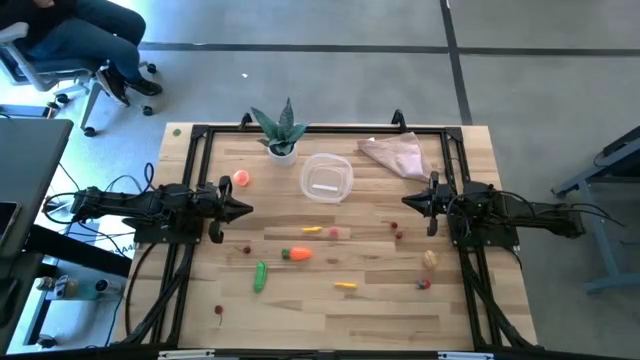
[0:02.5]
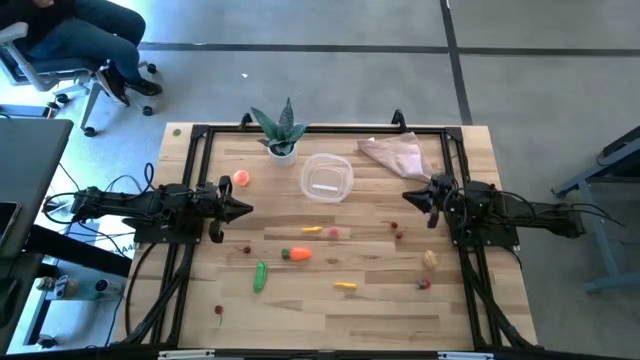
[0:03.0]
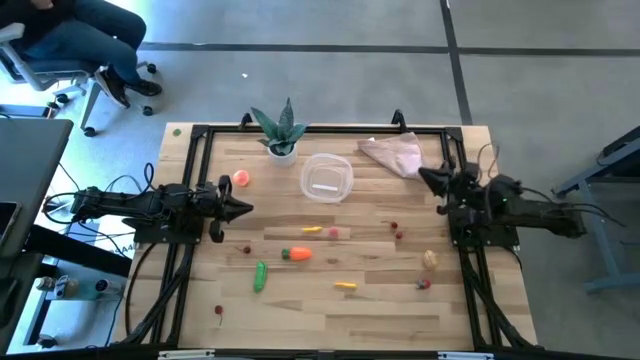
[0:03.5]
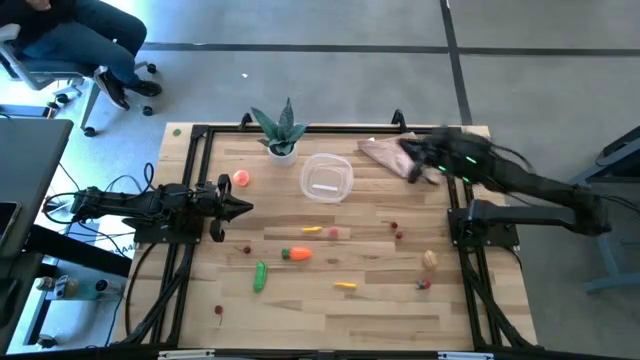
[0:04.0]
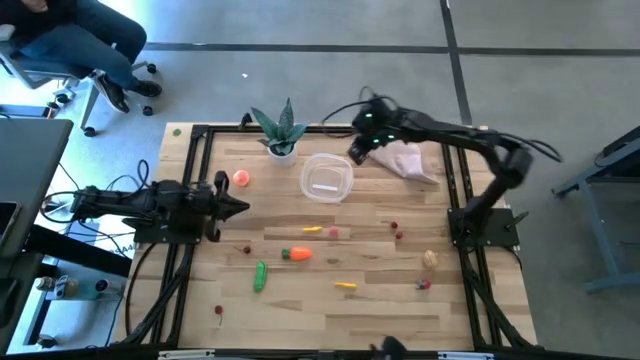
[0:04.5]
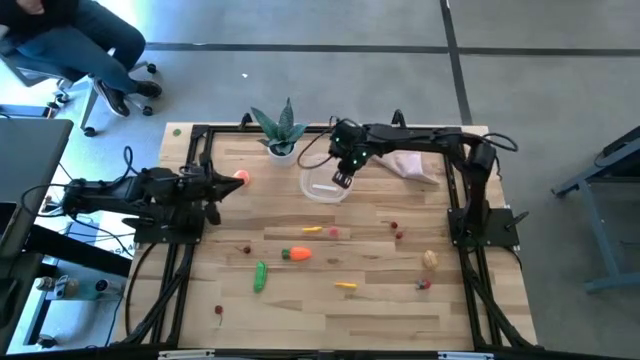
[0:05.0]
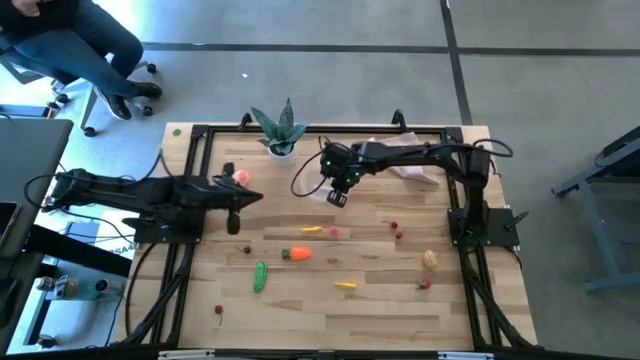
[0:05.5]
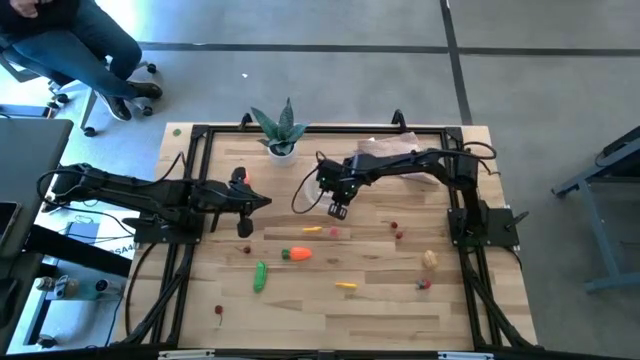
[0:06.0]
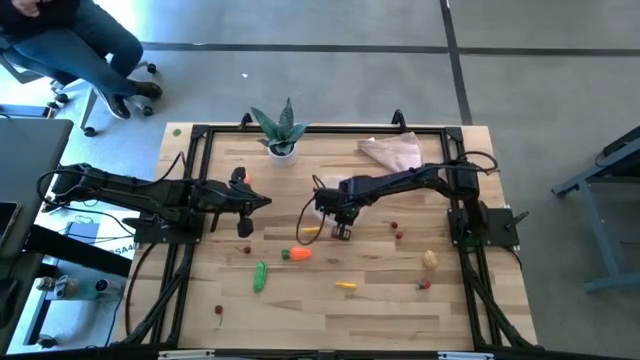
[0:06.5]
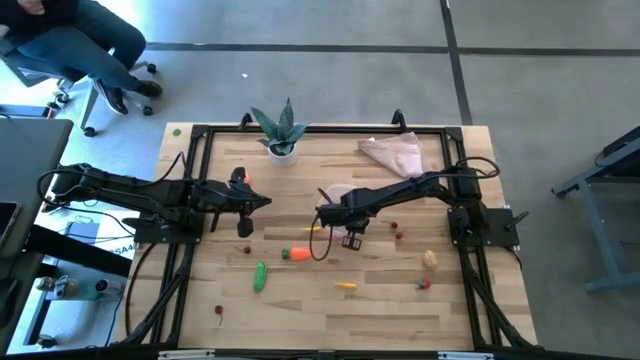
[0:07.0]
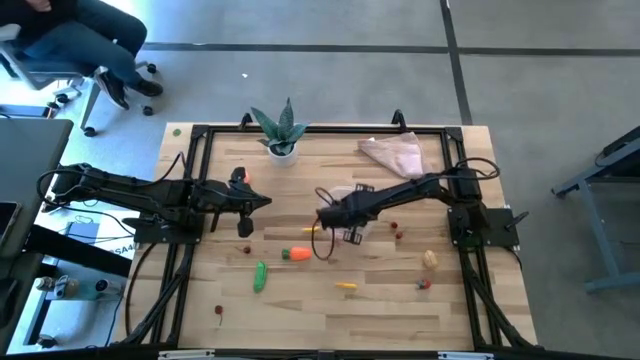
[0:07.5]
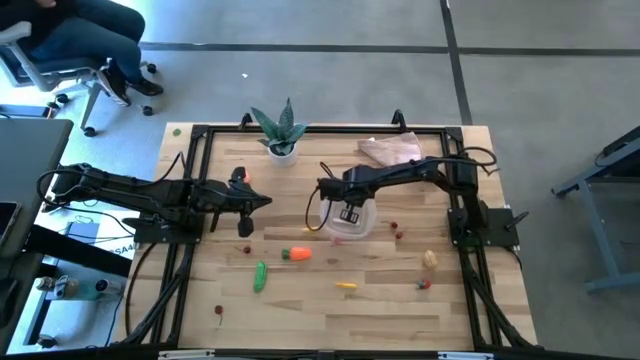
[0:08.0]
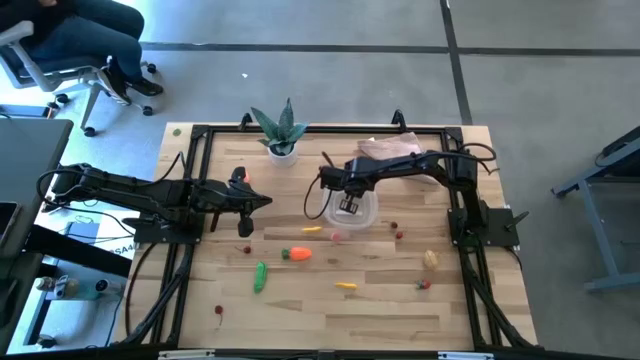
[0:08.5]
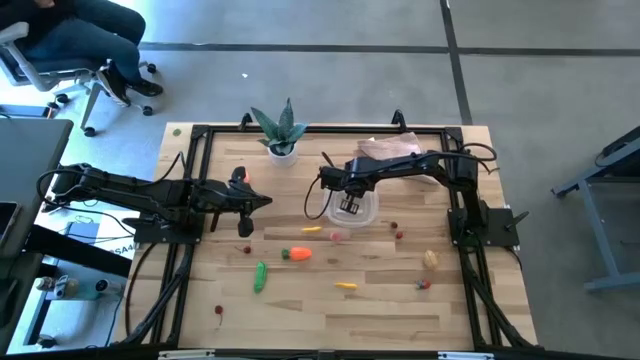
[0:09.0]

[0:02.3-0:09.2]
Task: Pick and placing Produce into tupperware
Move the transparent bin to the center of the table

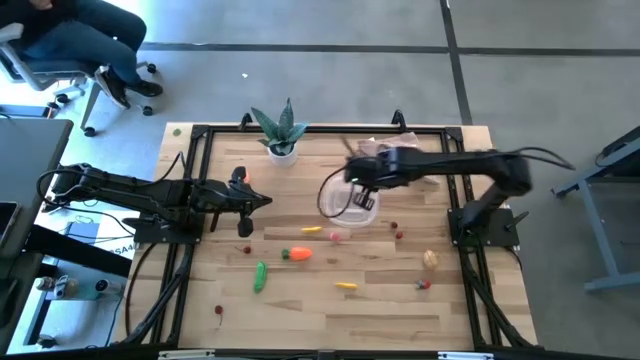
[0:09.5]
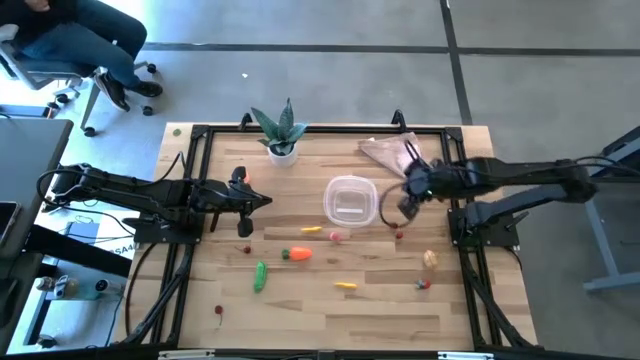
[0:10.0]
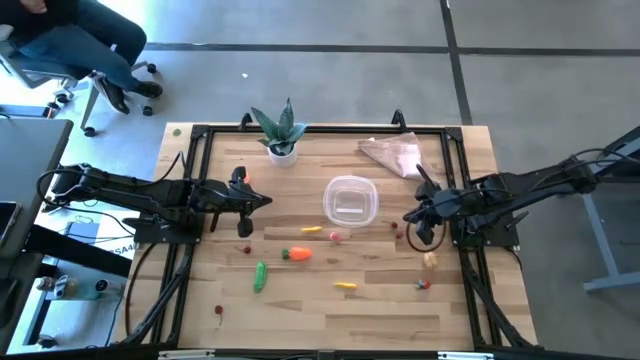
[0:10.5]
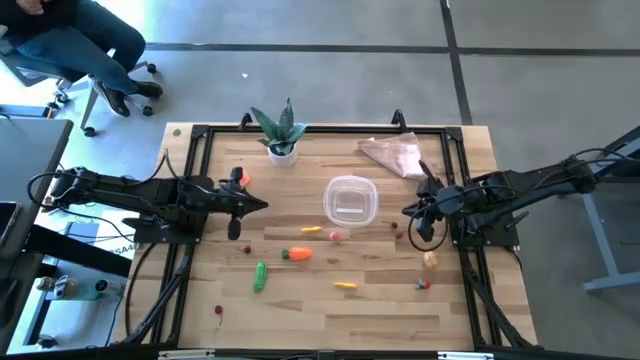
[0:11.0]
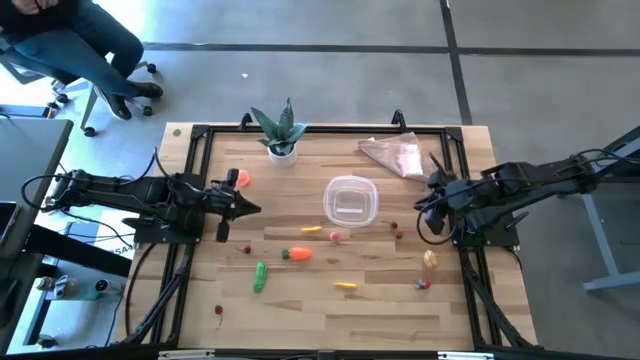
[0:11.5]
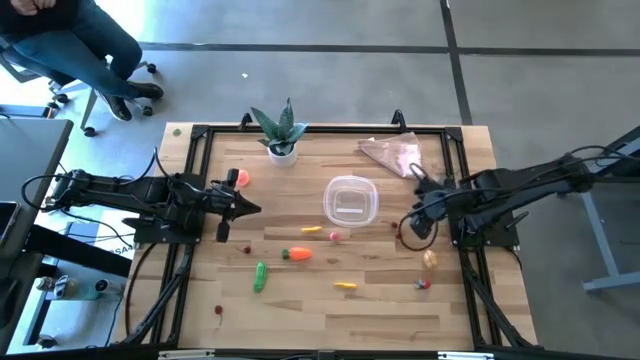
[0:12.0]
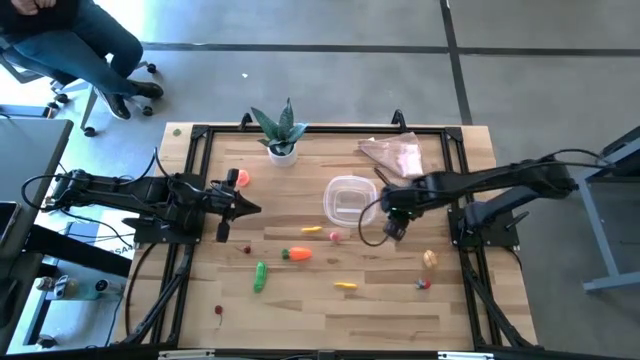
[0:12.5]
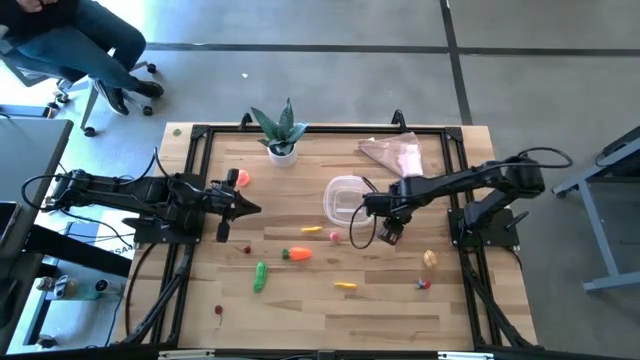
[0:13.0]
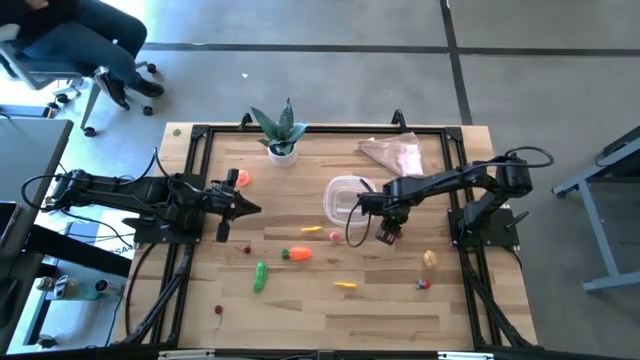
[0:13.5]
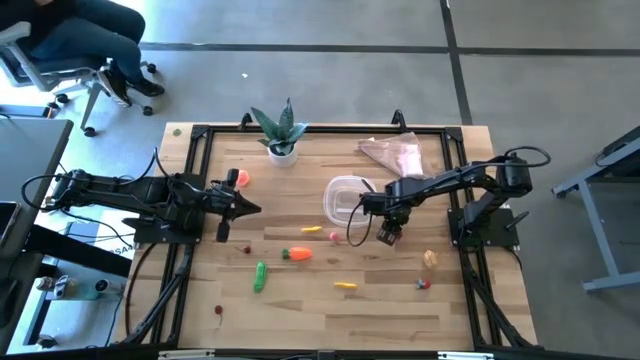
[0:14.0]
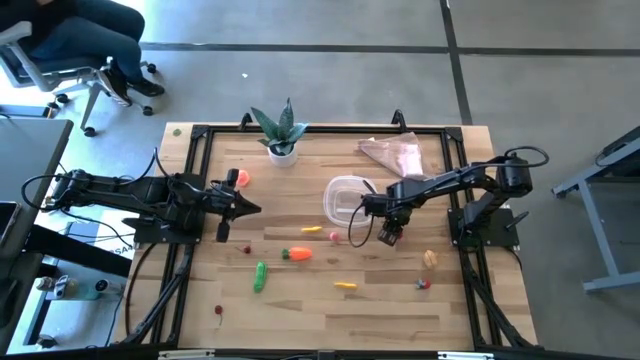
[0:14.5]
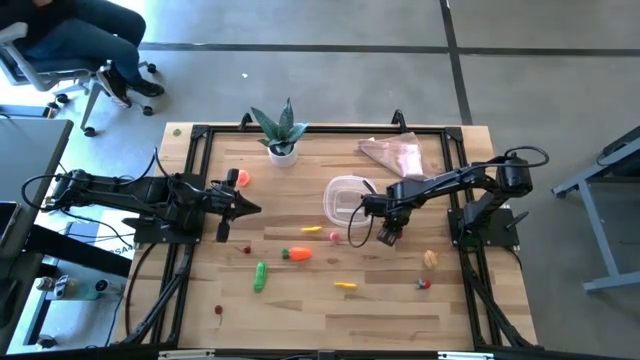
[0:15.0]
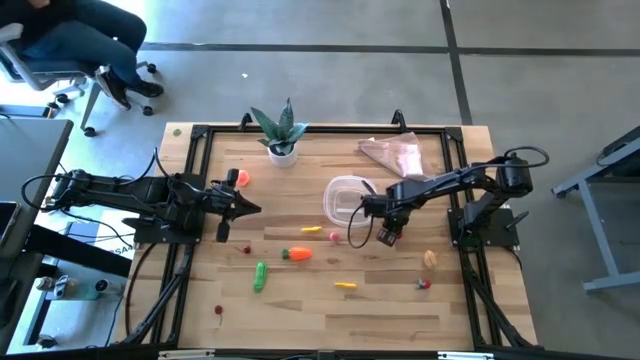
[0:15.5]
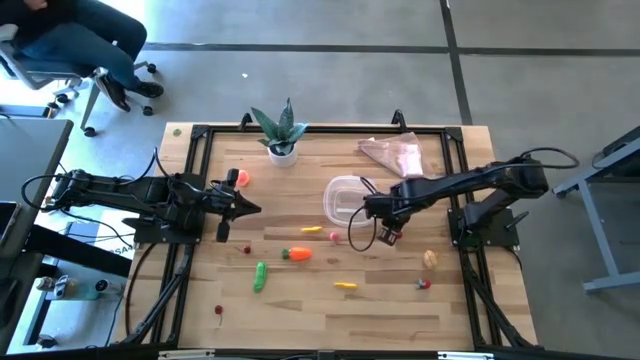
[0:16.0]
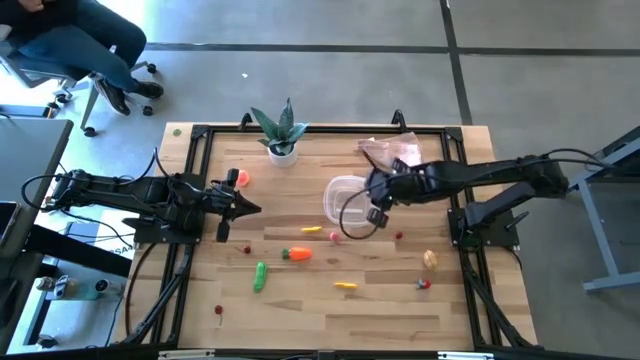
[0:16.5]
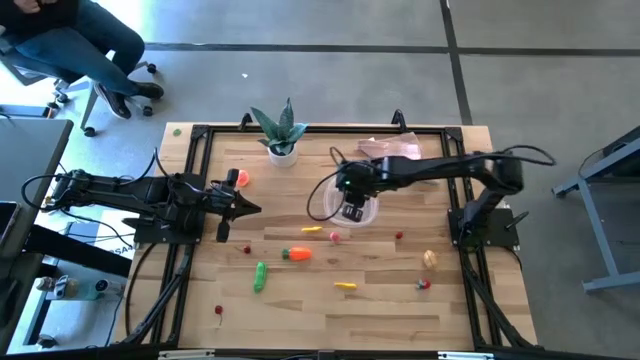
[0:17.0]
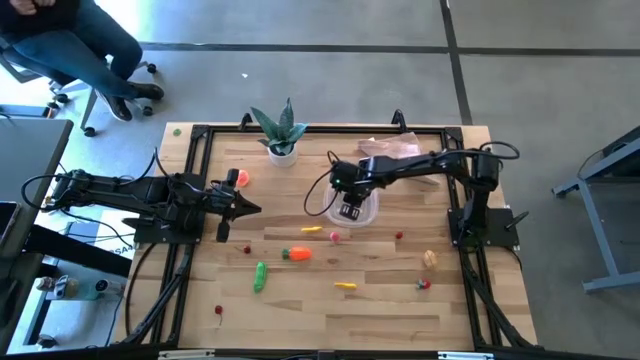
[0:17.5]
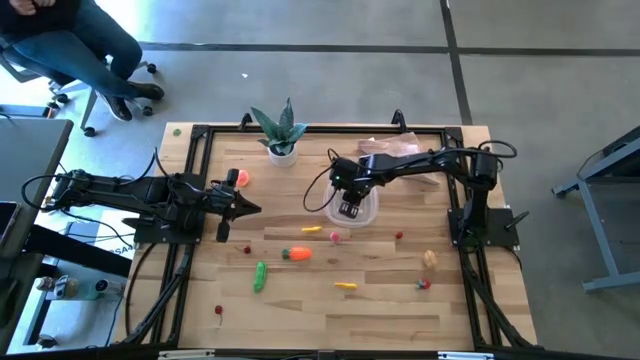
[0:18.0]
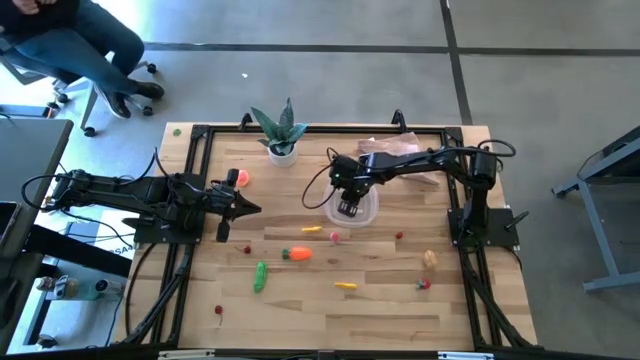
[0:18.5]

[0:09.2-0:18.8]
Put the red cherry into the transparent bin

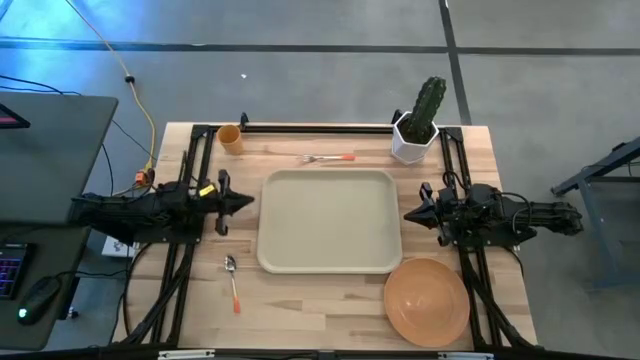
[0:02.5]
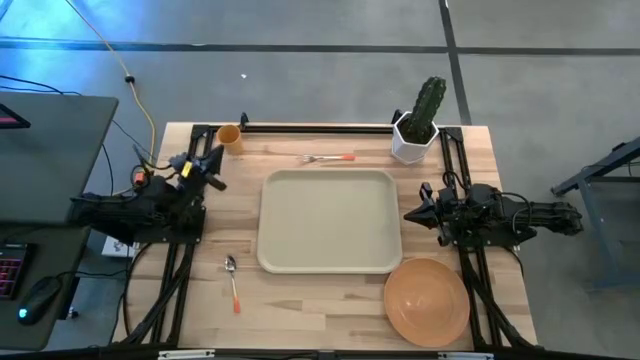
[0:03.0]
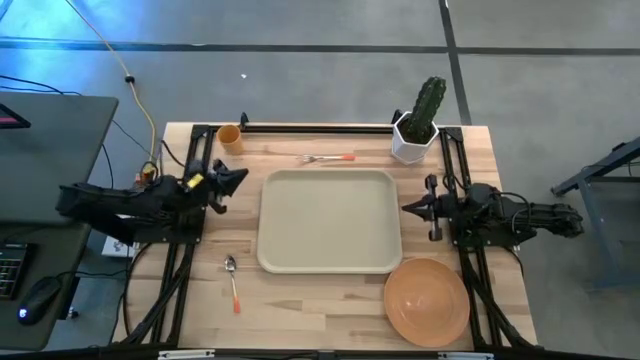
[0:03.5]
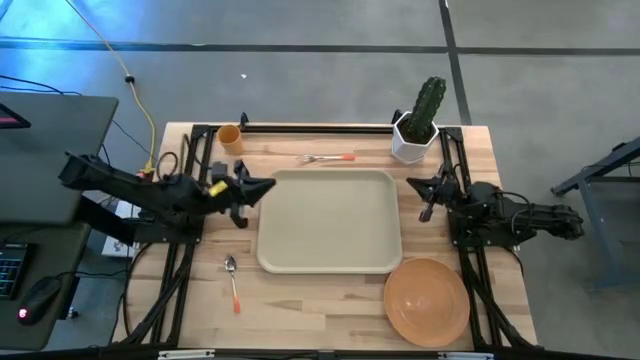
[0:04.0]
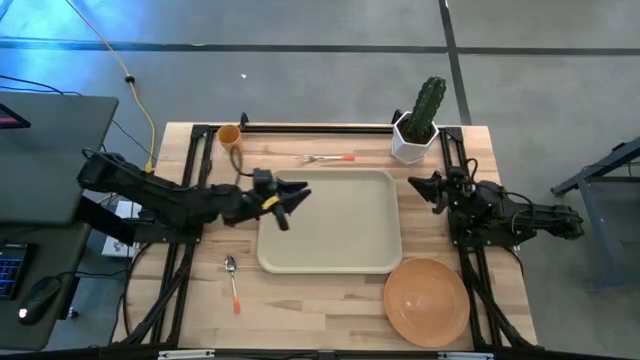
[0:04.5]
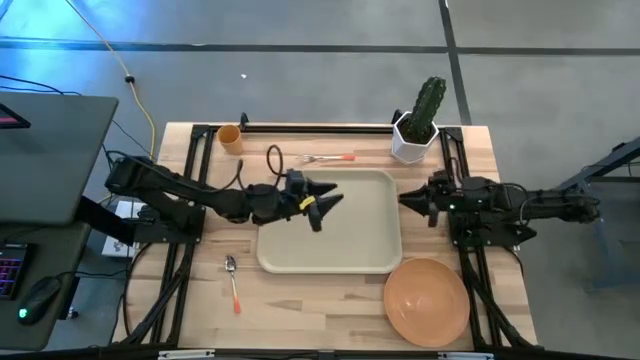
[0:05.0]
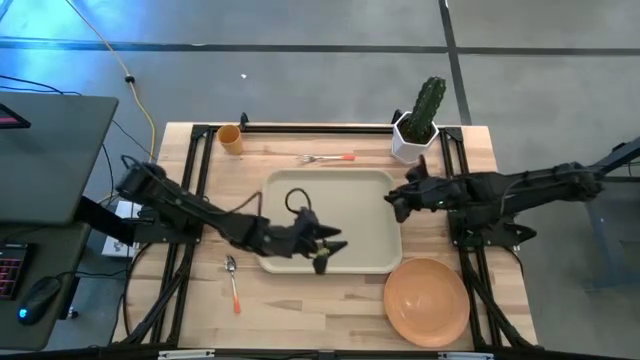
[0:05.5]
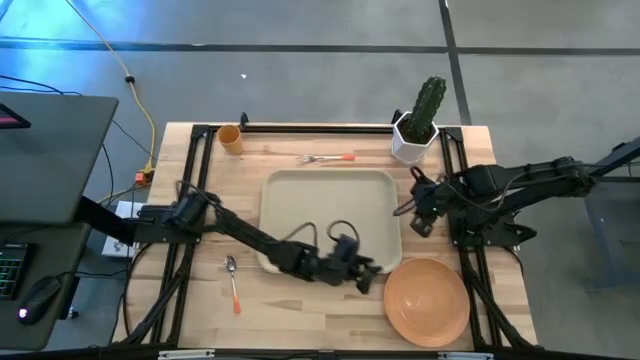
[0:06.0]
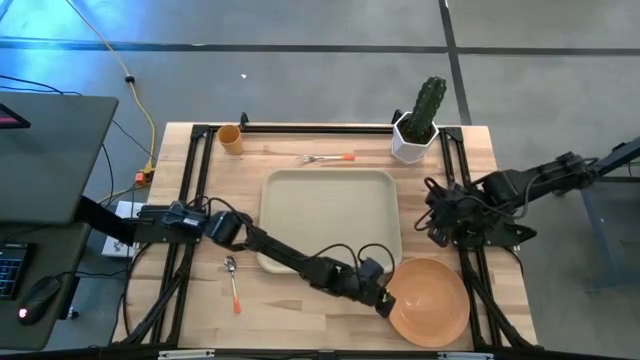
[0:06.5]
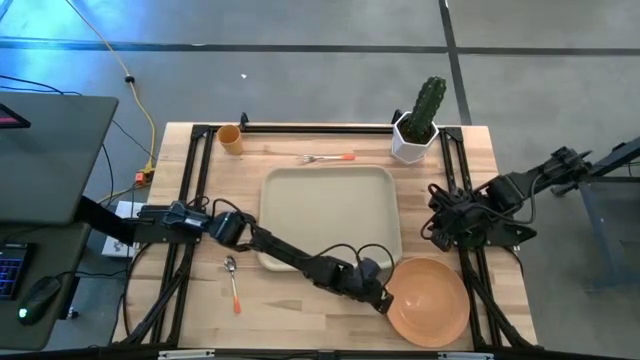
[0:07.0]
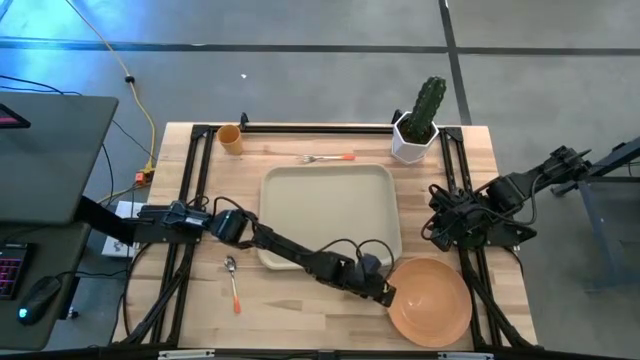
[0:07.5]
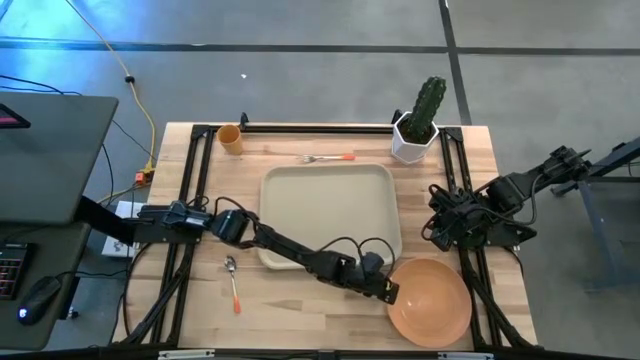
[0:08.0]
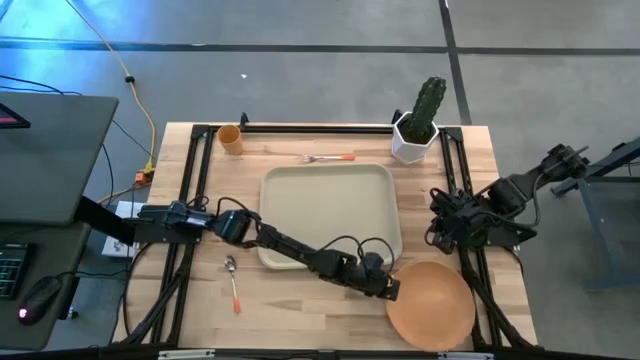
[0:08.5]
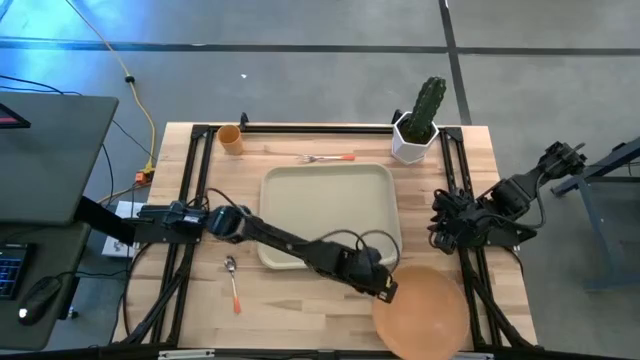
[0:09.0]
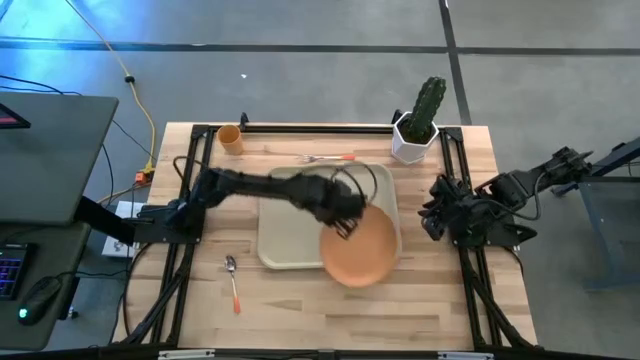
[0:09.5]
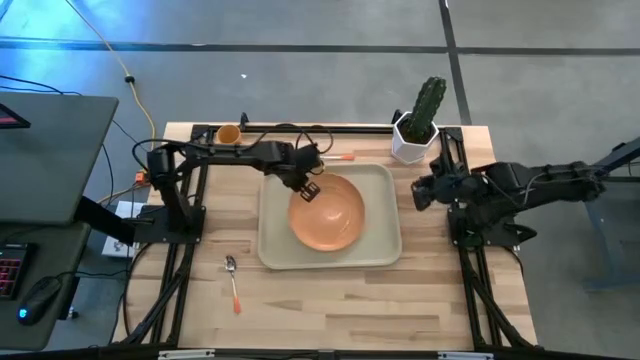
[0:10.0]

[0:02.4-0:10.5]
Task: Pick and place plate/cup/fork/spoon on tray
Put the orange plate on the off white tray
